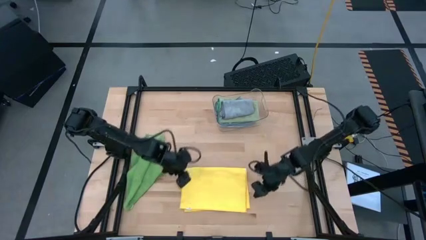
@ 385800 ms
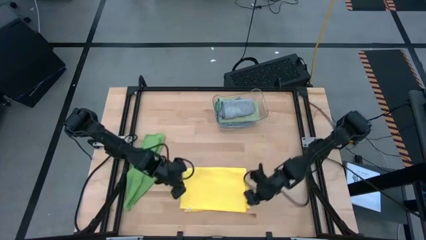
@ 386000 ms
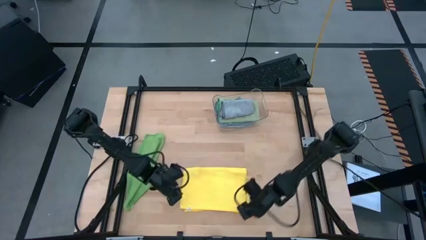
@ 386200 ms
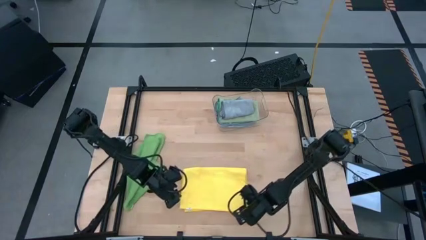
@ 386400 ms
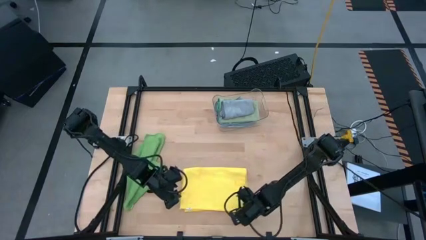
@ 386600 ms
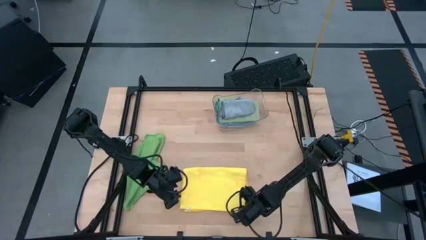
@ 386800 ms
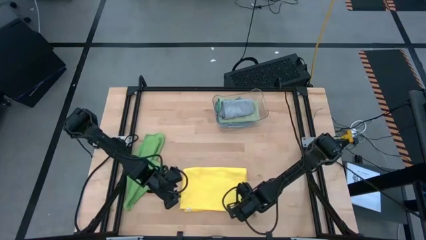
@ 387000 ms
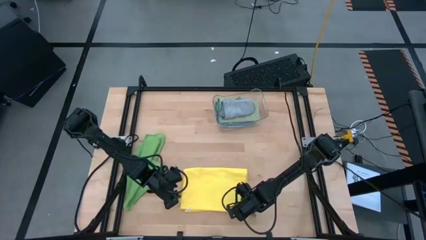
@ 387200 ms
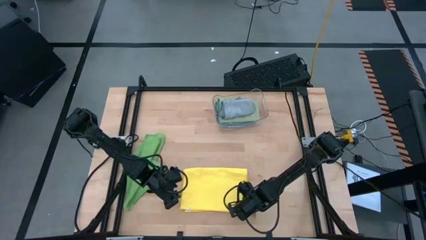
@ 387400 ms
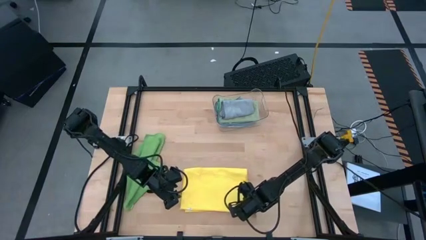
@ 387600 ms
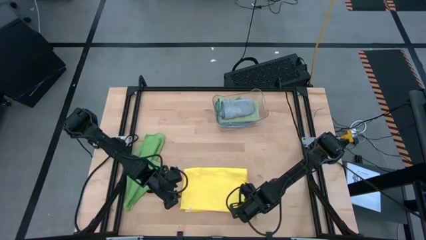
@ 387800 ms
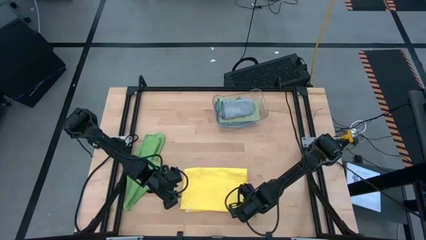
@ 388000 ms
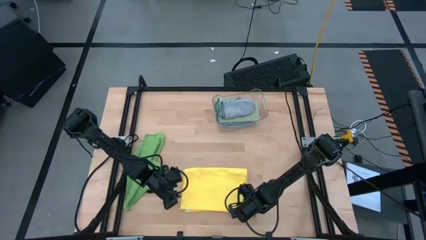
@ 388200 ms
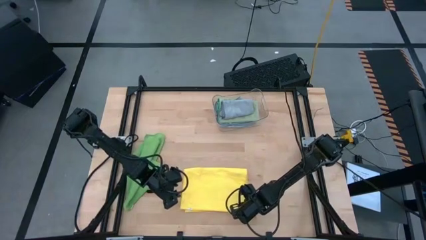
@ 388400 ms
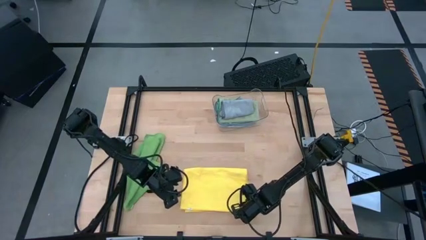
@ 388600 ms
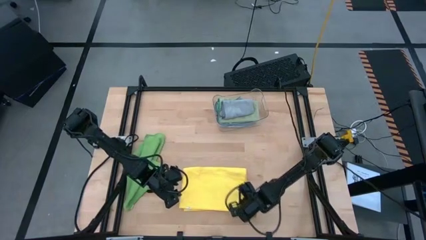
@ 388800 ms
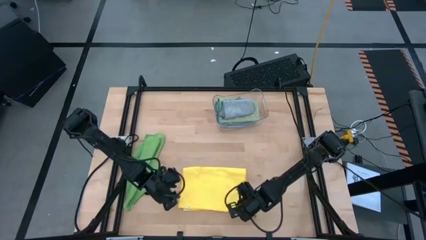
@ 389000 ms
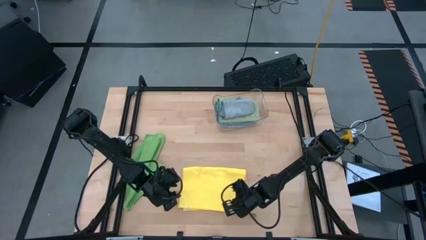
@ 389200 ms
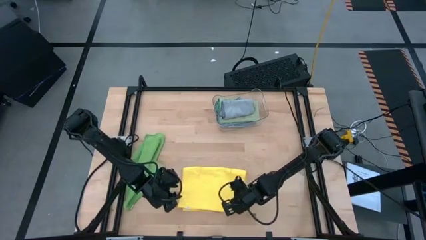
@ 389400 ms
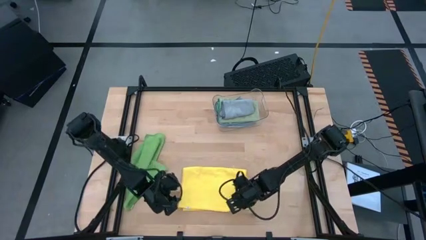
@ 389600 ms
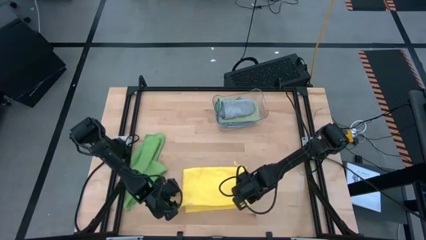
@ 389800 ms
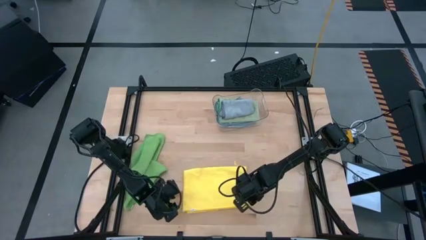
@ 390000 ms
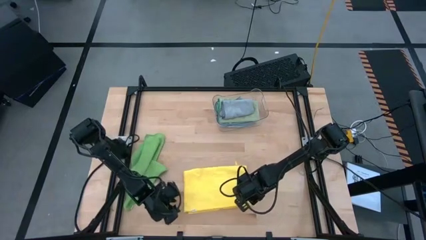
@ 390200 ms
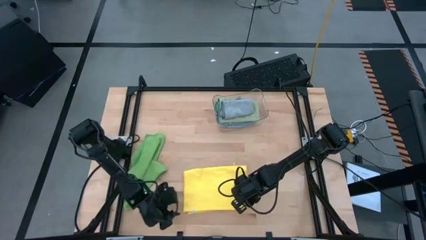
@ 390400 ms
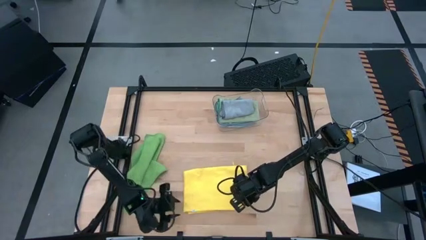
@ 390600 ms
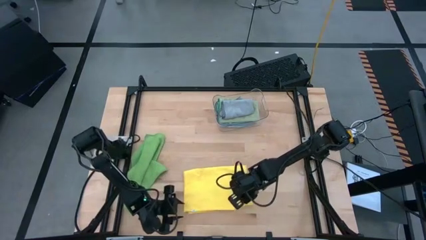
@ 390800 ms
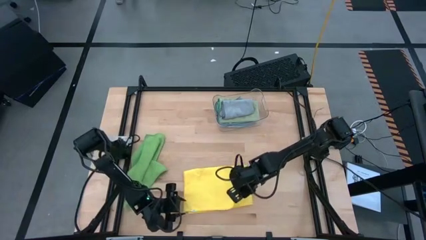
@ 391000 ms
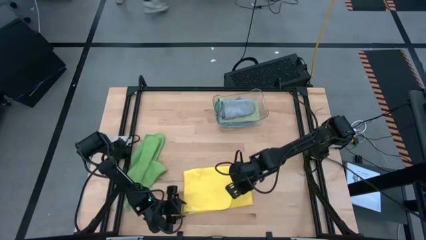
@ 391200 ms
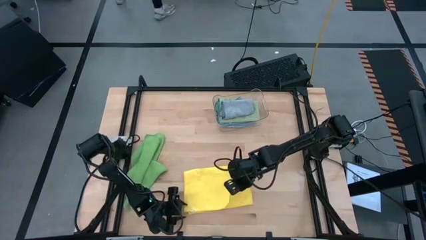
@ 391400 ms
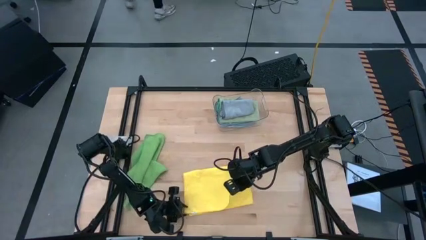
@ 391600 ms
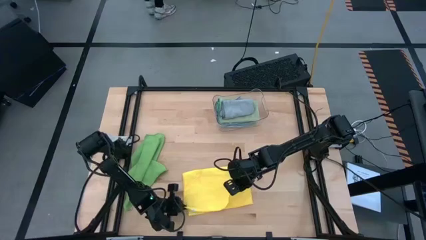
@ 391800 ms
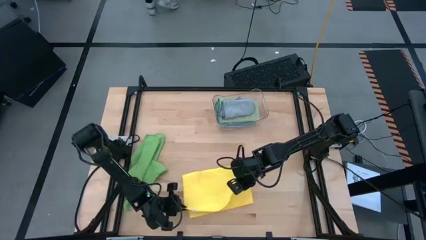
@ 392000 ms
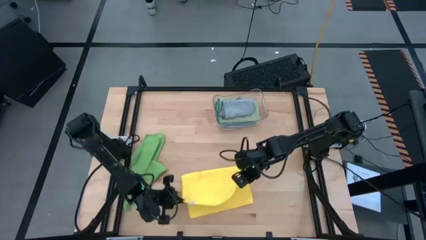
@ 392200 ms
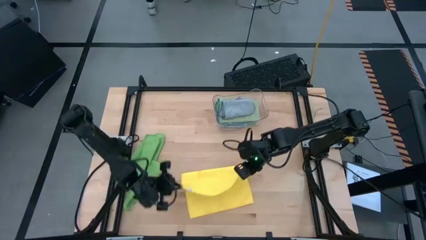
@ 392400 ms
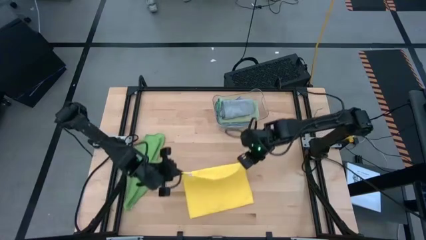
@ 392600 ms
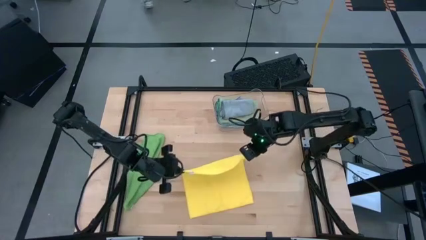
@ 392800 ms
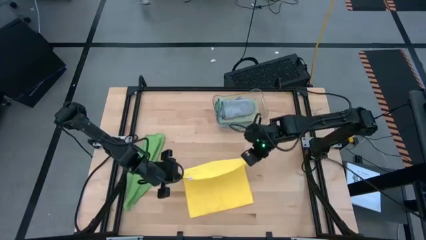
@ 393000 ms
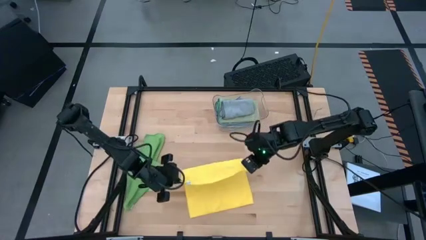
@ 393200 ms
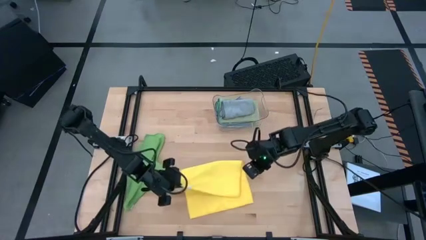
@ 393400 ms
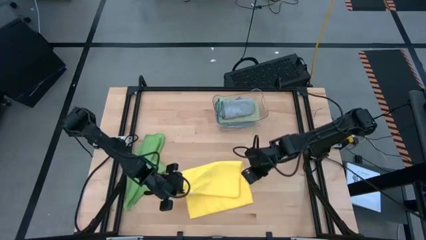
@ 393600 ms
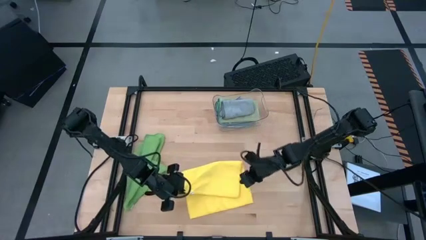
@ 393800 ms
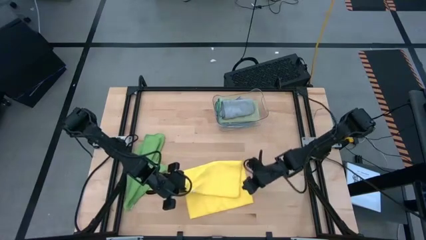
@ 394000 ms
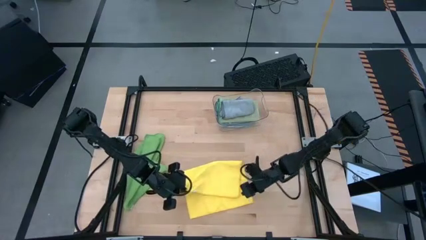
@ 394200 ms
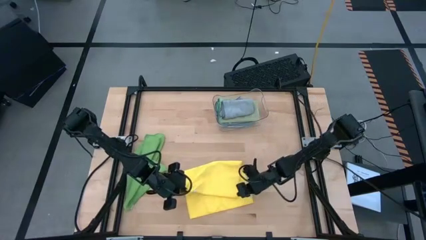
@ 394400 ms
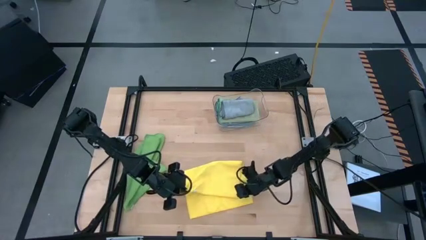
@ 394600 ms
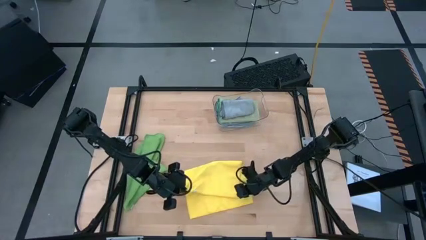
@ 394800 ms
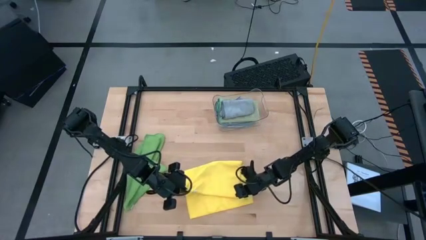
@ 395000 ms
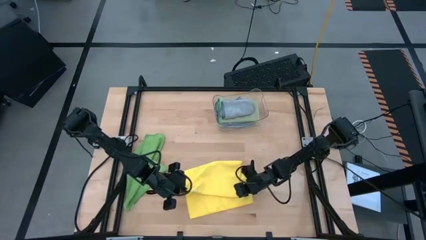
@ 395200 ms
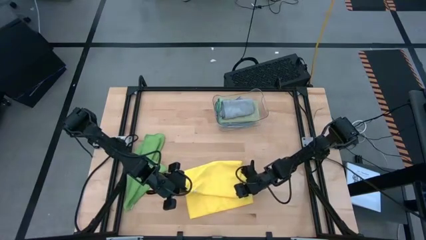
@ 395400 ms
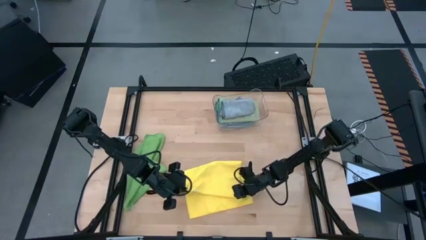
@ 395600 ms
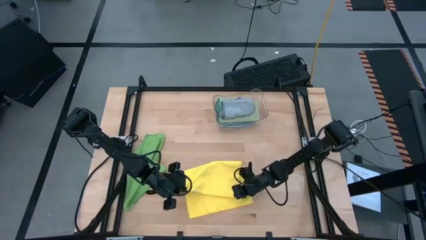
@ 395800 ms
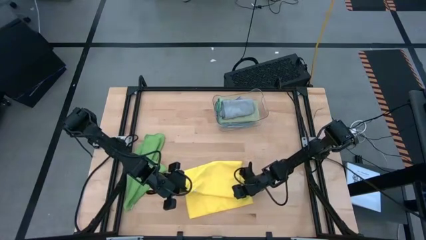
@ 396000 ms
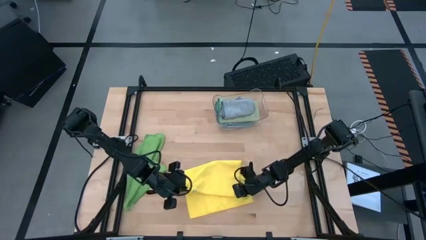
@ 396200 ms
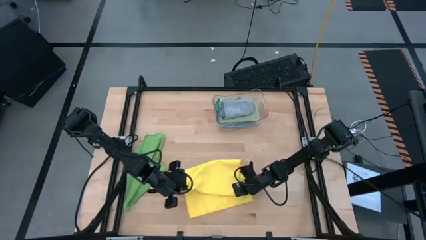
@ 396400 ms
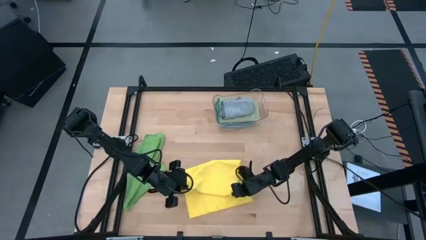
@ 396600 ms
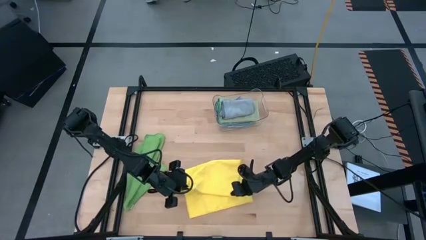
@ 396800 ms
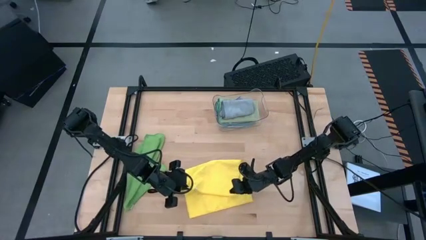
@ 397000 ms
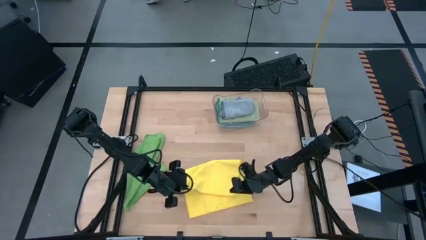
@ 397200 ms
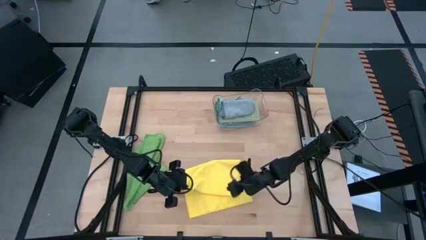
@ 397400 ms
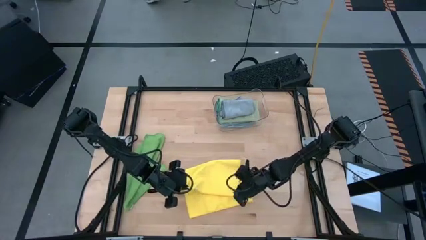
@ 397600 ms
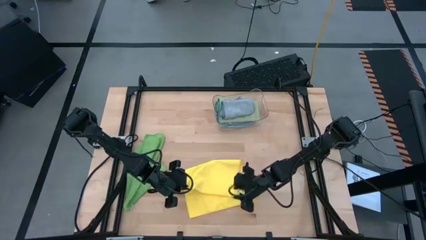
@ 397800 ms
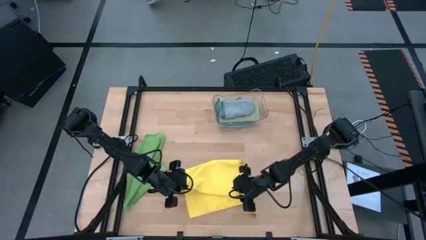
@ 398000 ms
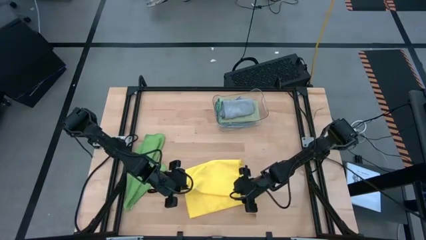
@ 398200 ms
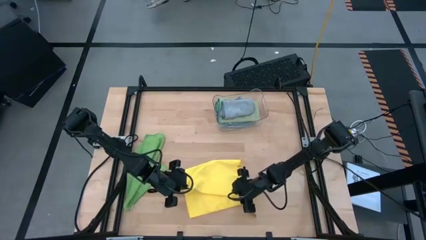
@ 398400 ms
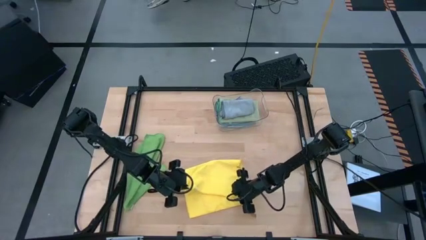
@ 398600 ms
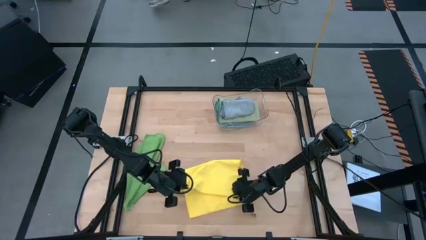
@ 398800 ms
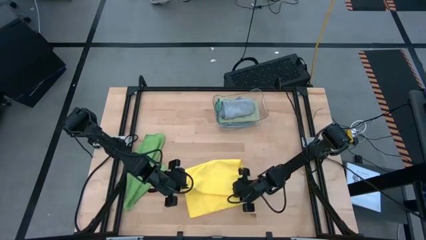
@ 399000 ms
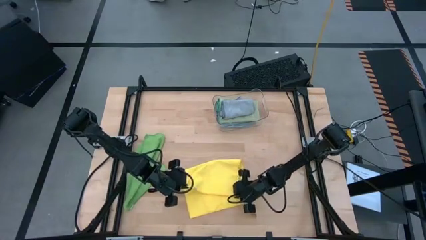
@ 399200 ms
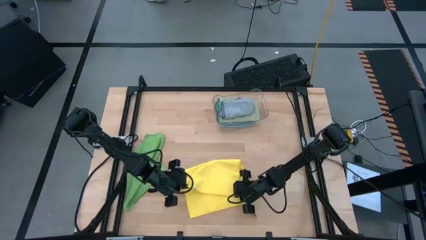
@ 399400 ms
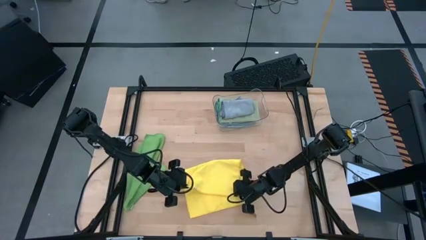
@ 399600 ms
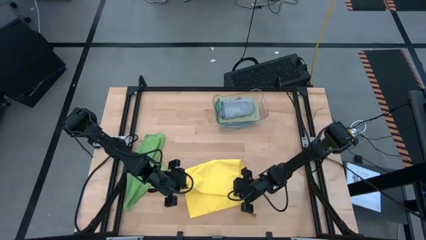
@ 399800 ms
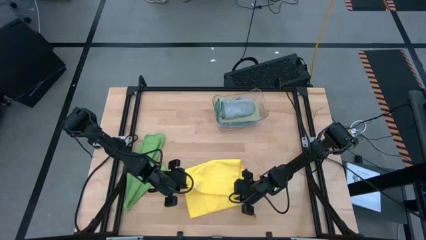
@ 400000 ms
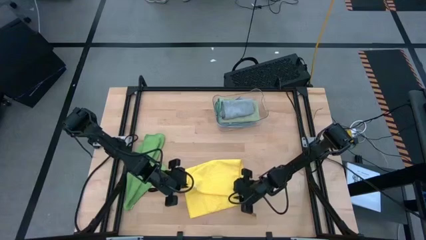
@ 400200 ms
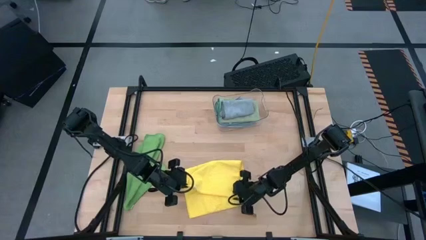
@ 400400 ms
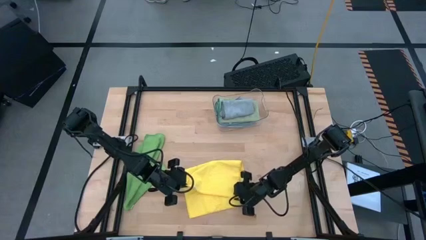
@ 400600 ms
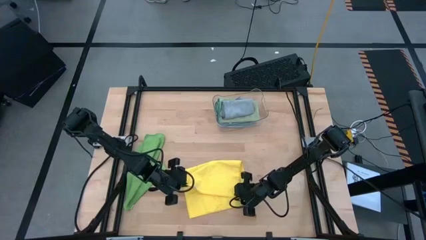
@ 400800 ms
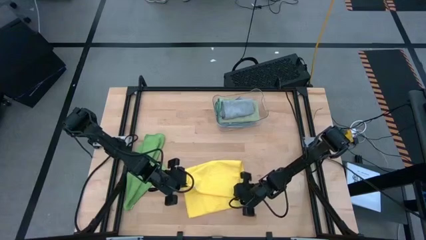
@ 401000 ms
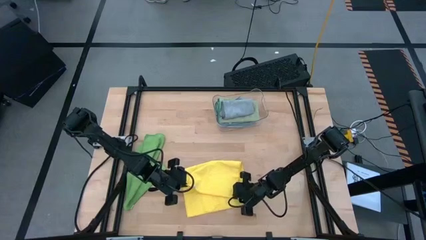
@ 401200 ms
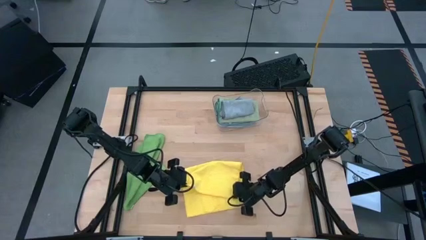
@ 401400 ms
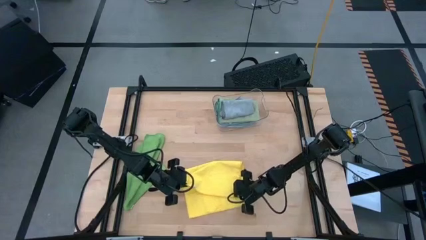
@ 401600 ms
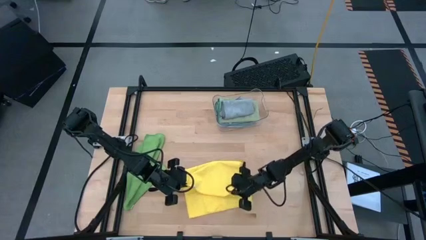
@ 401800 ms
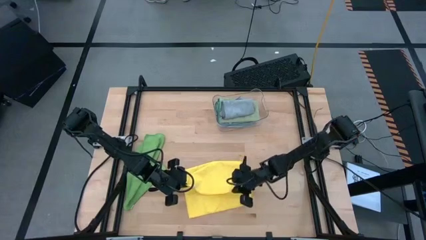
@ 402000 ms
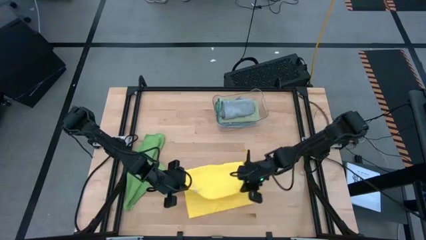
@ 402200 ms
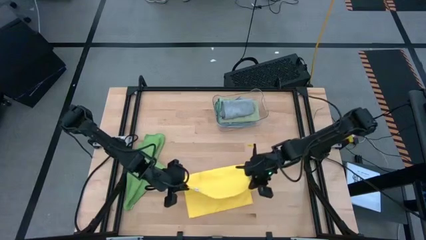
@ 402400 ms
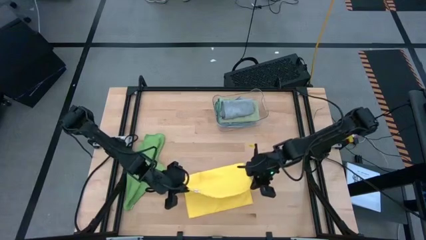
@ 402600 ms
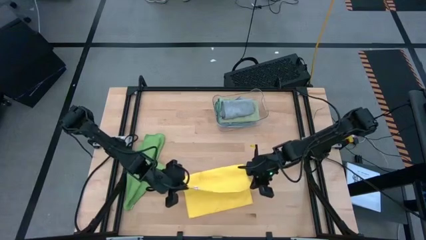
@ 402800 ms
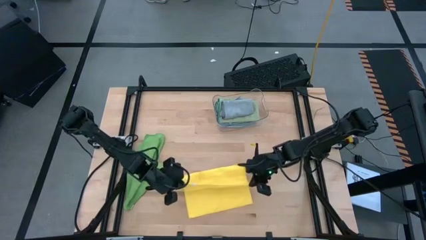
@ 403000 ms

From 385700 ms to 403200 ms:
Task: Fold microfiber towels
Fold the yellow towel
